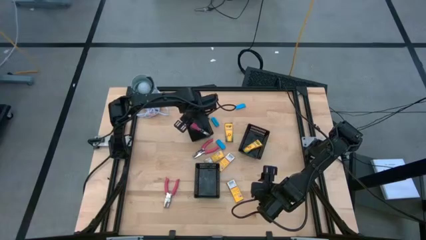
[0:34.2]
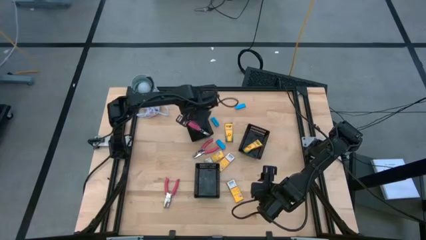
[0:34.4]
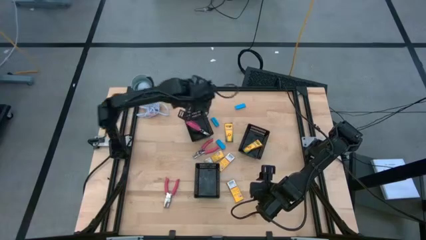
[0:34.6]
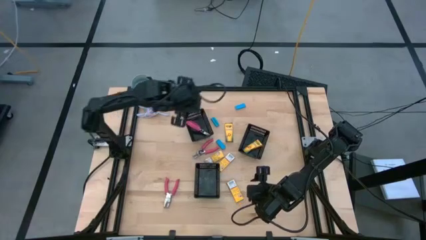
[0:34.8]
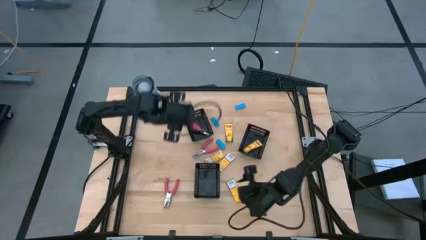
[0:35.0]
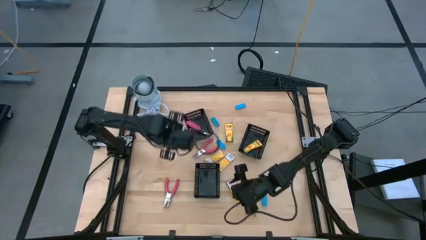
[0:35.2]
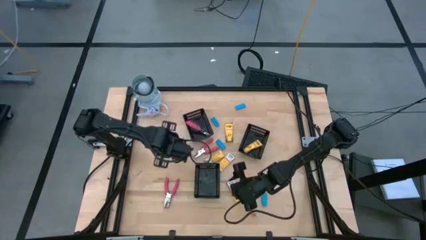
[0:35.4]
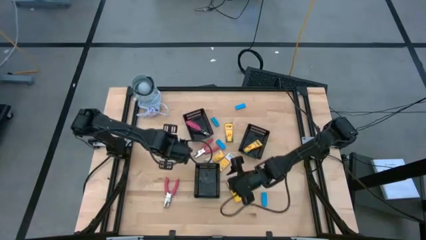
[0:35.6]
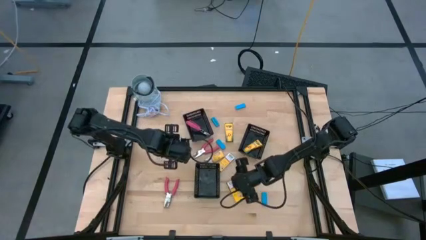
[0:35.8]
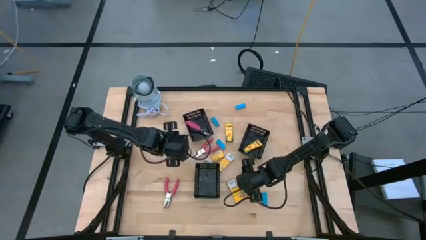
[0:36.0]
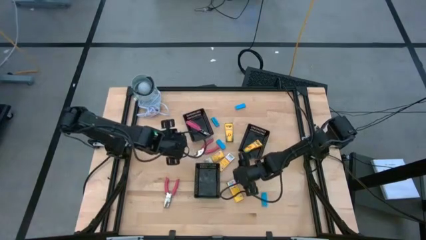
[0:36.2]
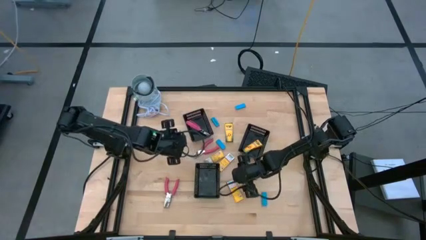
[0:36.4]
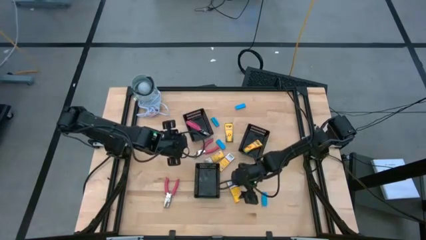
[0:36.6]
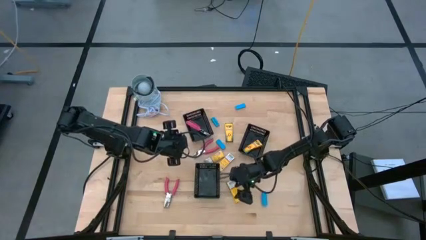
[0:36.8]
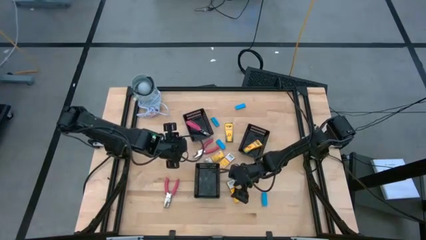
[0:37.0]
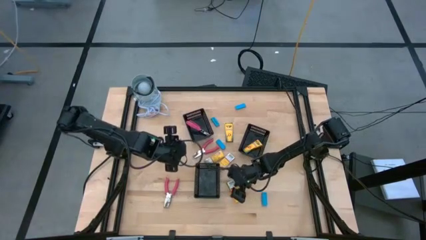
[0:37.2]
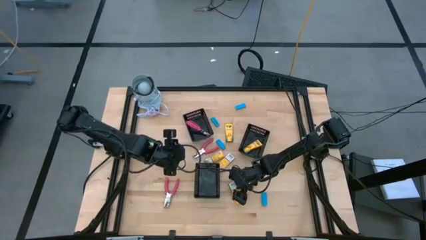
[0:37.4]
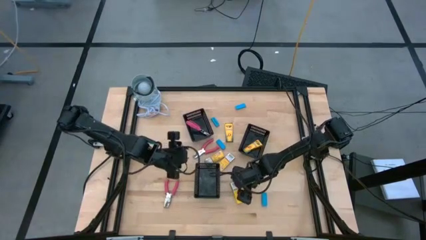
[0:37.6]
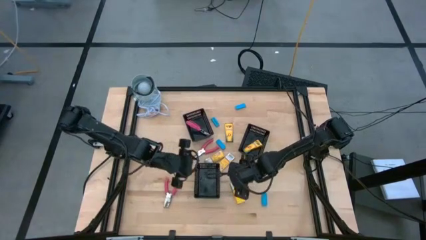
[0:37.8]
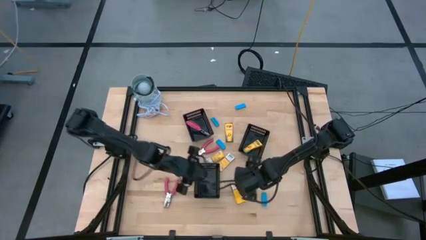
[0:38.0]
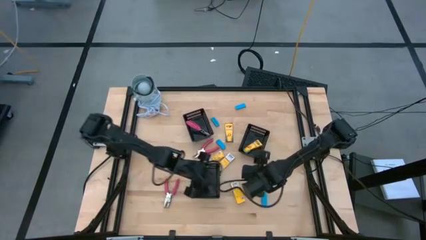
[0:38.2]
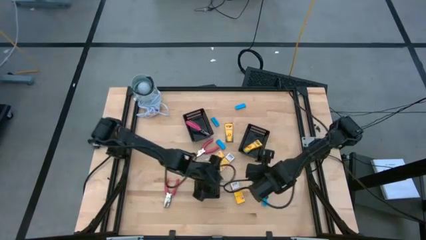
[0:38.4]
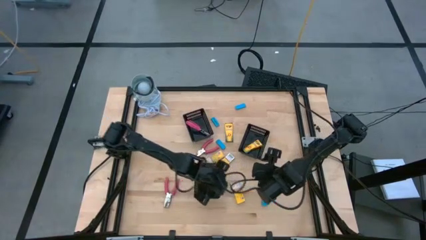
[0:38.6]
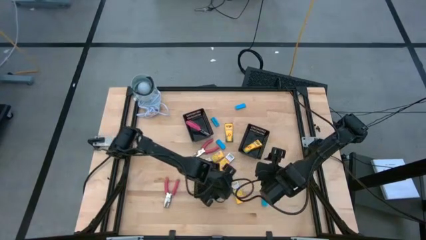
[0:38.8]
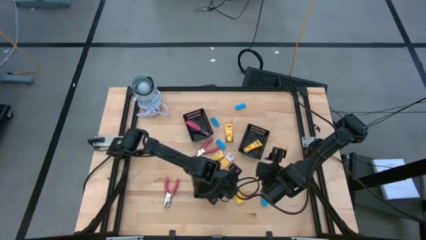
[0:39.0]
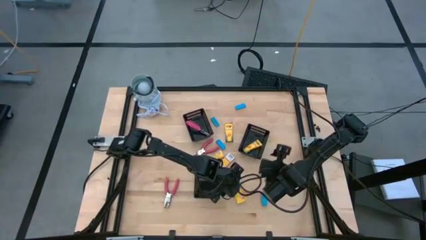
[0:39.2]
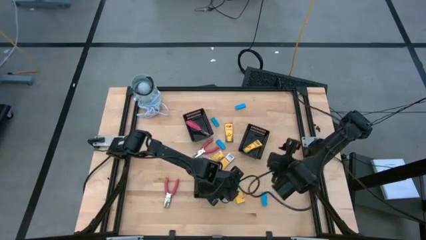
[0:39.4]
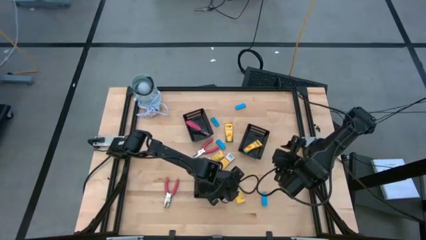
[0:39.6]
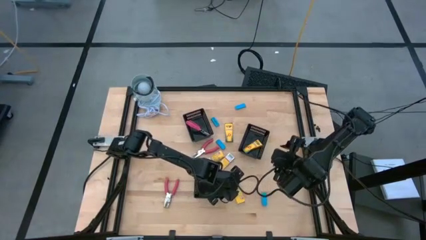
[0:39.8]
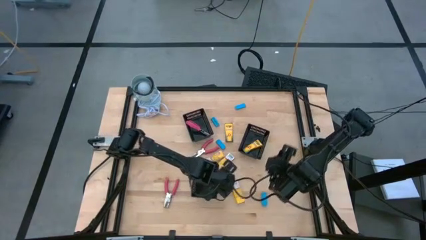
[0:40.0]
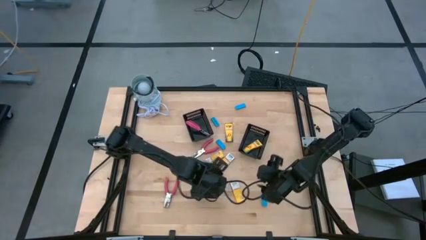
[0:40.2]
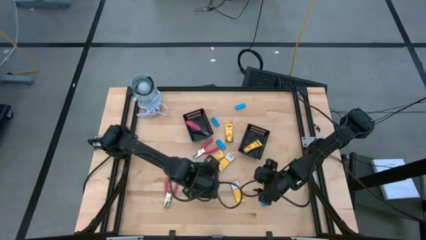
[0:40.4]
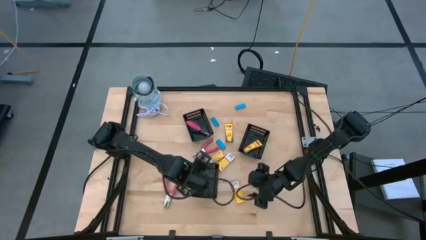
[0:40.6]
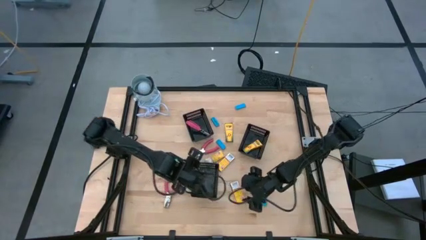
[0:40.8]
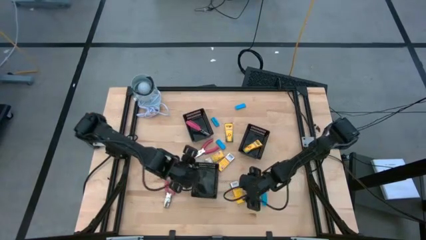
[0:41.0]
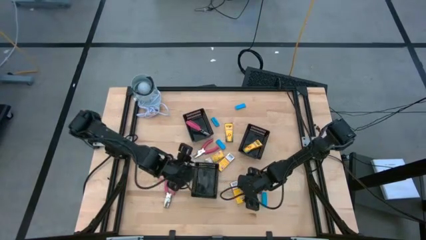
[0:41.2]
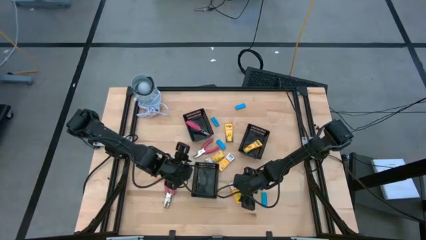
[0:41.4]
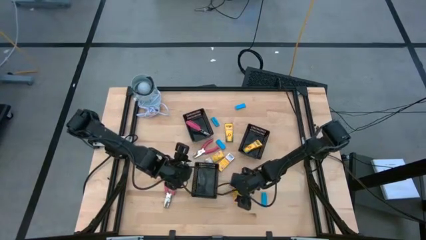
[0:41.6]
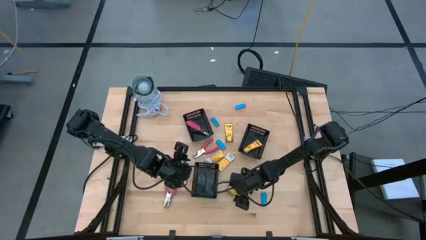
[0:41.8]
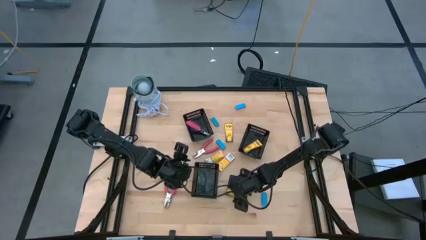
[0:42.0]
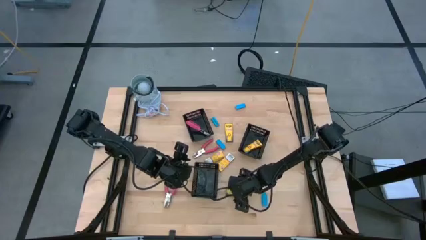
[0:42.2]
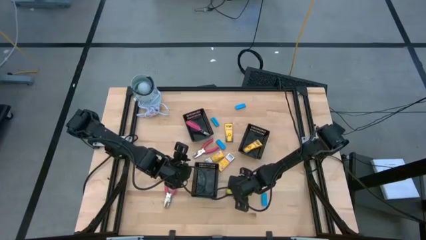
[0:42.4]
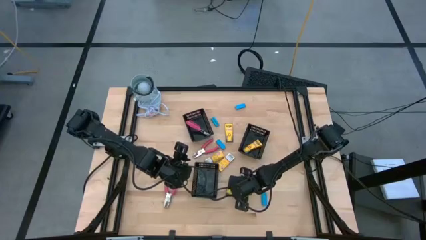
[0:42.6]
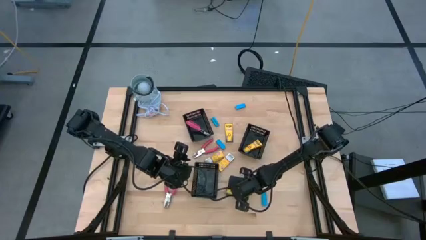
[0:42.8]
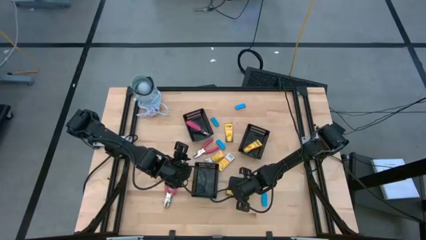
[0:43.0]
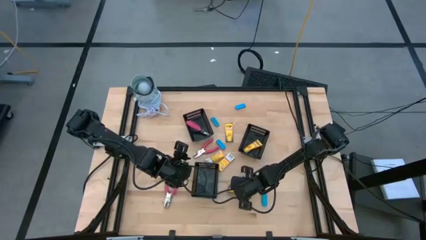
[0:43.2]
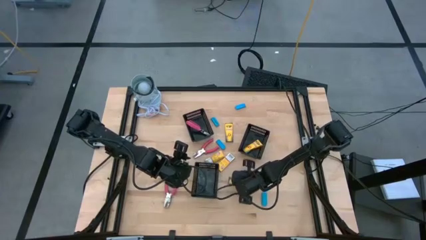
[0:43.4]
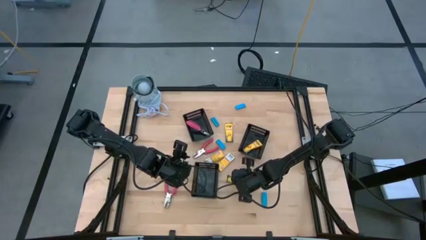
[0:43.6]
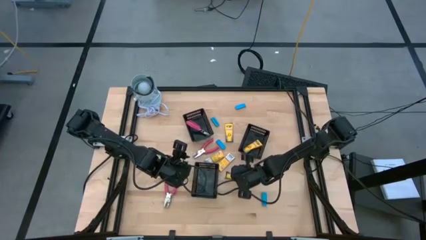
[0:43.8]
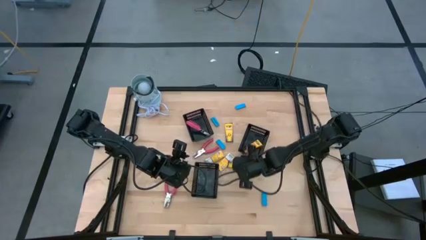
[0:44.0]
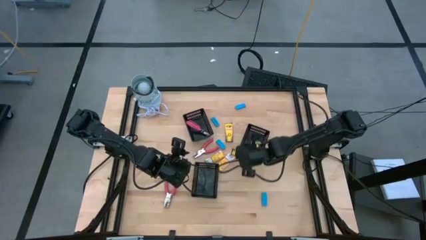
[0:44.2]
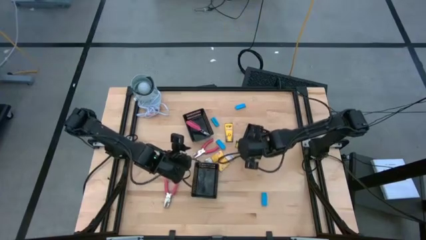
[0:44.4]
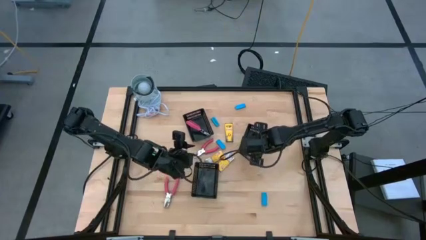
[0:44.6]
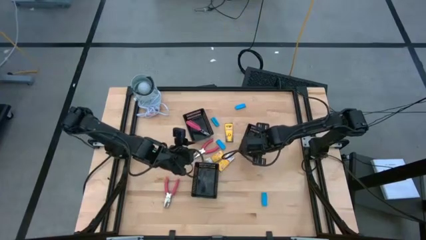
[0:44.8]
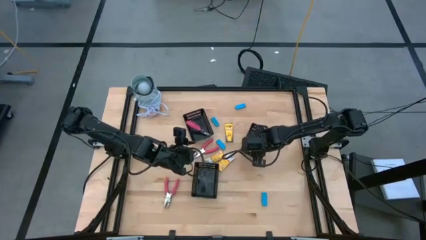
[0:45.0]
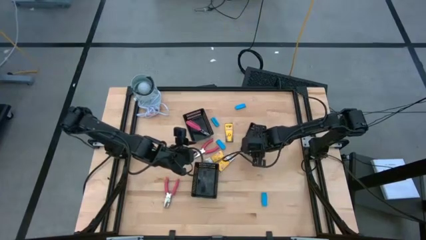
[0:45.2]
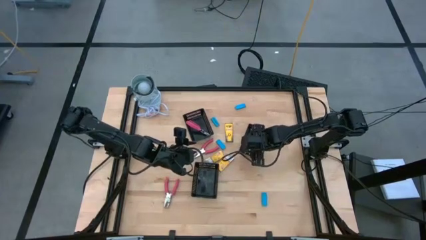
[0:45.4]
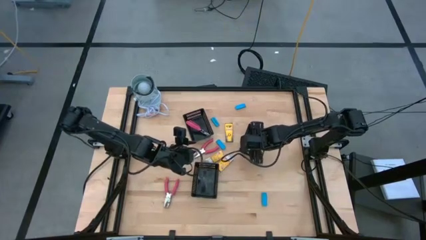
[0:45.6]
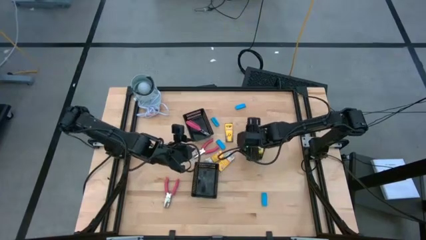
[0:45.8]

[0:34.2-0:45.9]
Task: Pick & Place School Supplies
Put the yellow crayon box into the left black basket

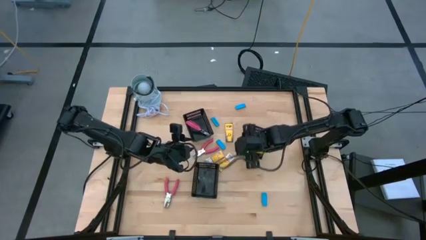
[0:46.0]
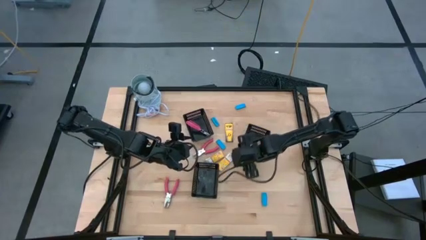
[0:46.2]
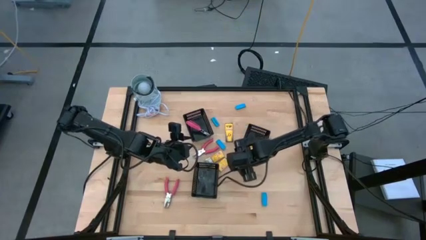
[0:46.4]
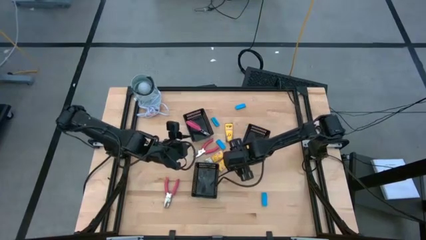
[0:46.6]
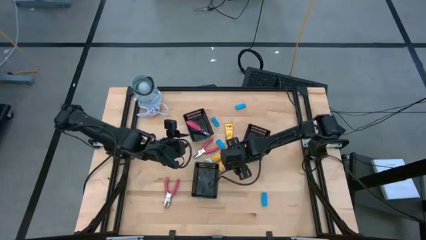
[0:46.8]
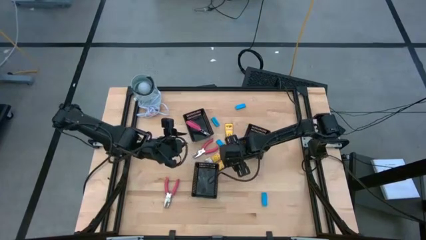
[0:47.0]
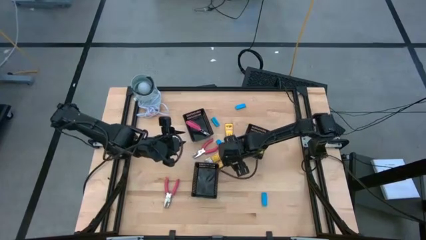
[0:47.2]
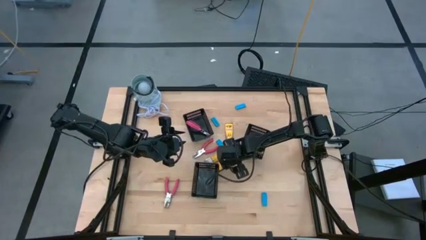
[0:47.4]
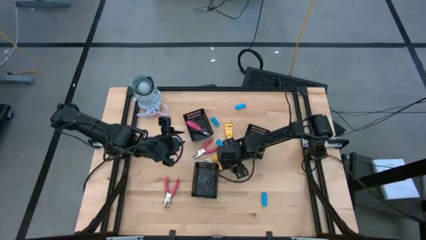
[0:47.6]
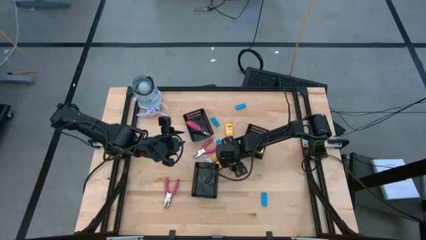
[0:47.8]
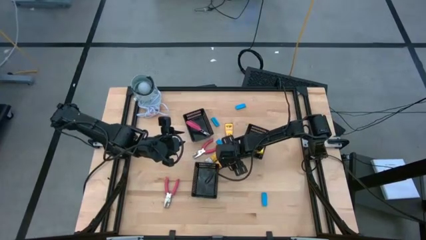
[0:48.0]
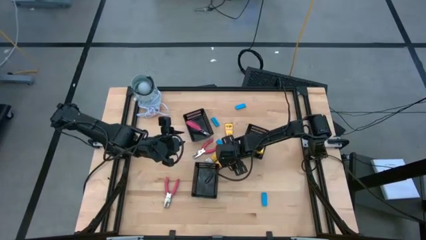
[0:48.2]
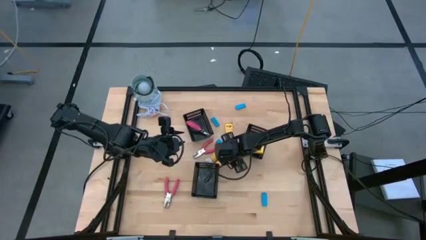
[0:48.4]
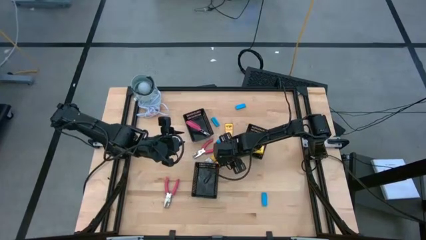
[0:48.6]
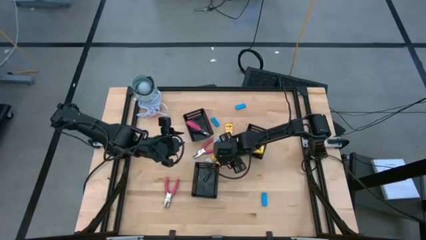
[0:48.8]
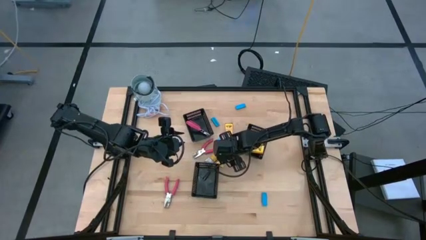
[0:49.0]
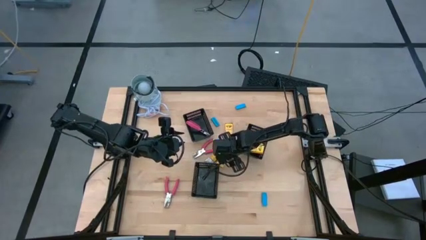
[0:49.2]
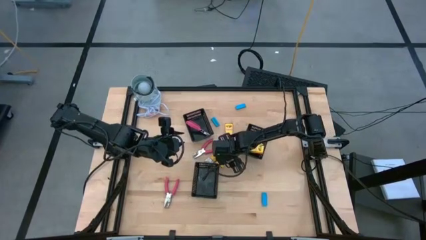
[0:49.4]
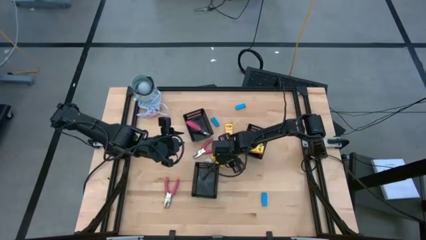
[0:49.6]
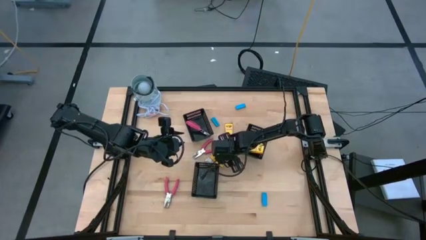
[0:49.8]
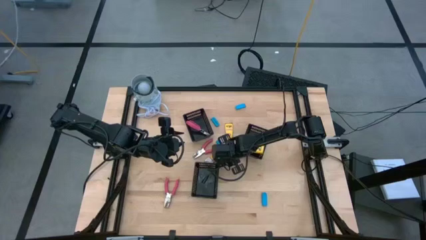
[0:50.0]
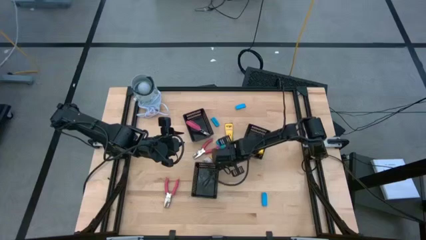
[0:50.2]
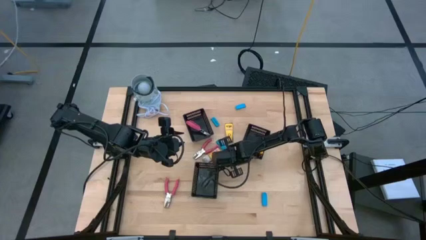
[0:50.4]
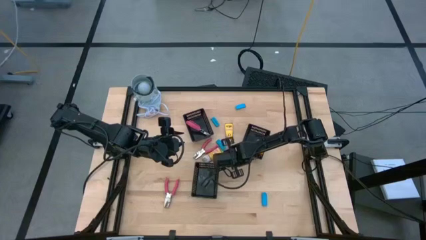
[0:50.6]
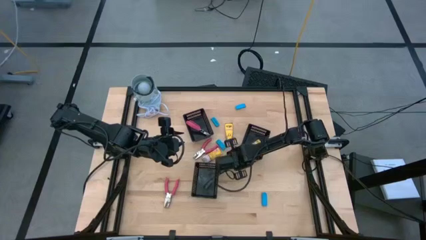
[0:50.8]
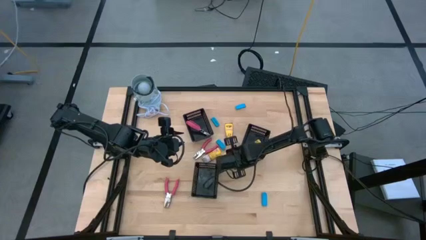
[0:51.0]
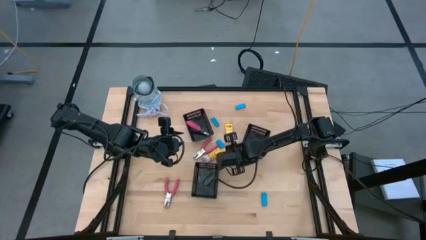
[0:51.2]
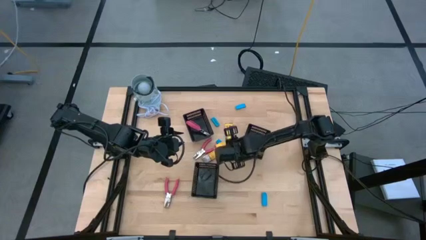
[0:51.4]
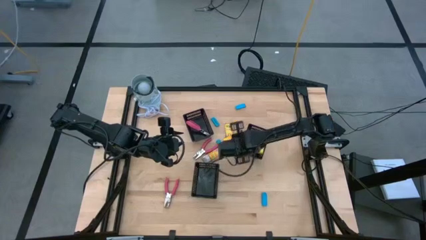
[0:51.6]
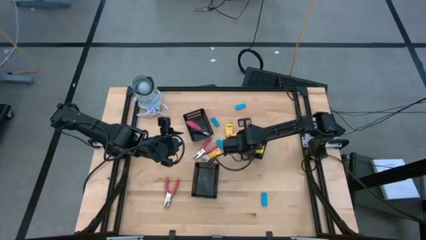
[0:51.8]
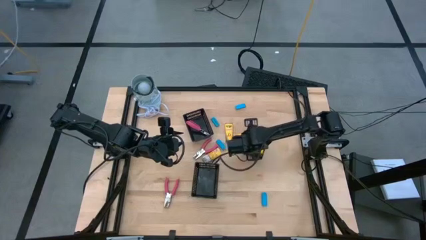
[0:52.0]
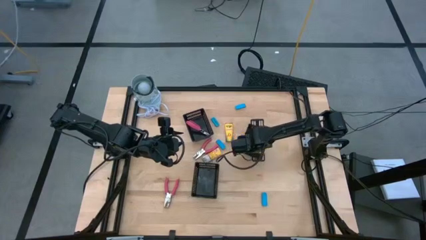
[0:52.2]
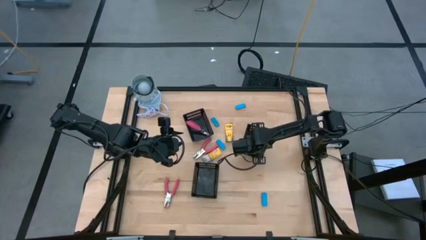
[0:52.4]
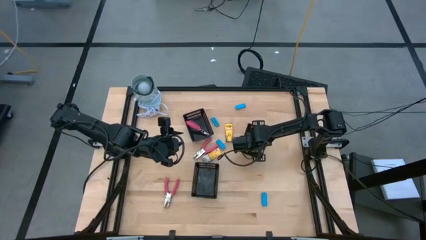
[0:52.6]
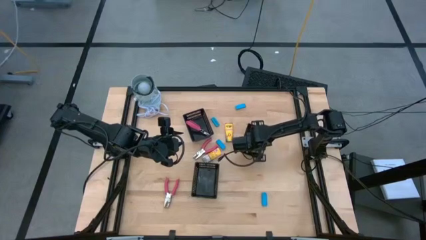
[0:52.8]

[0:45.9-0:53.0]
Put the yellow crayon box into the right black basket
